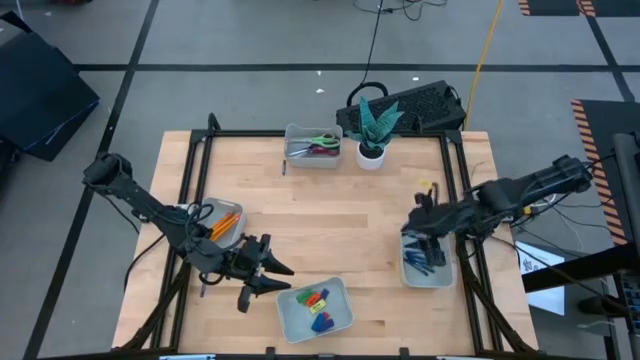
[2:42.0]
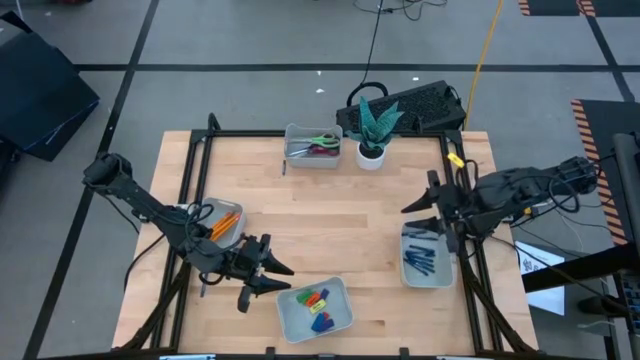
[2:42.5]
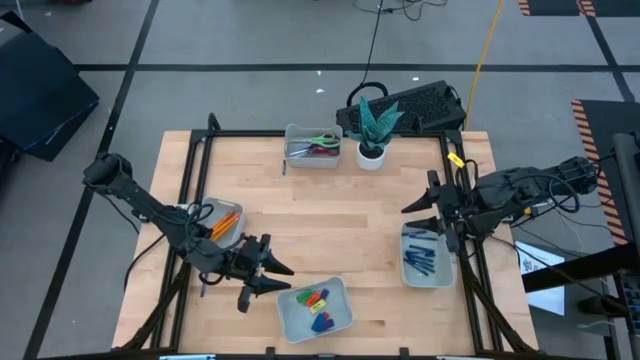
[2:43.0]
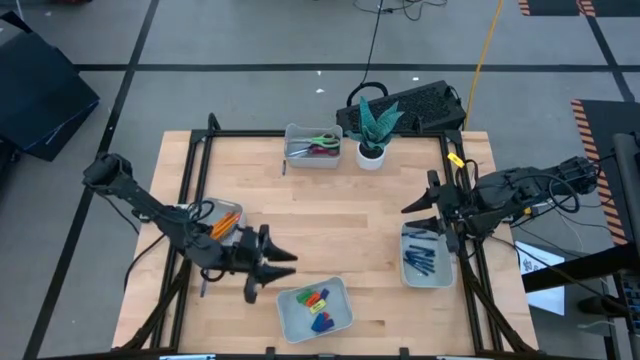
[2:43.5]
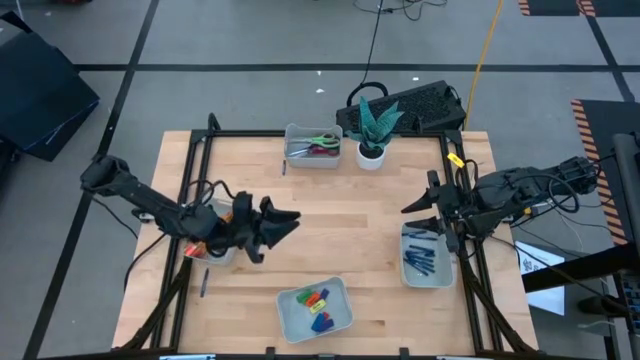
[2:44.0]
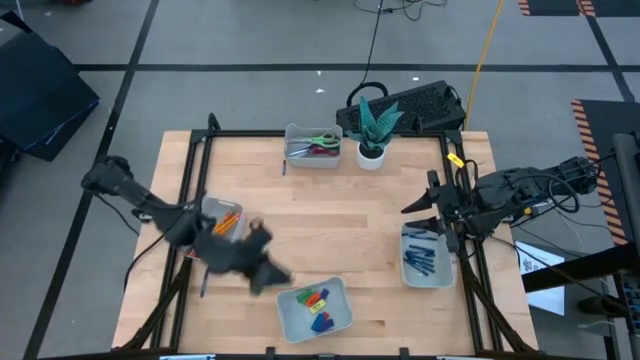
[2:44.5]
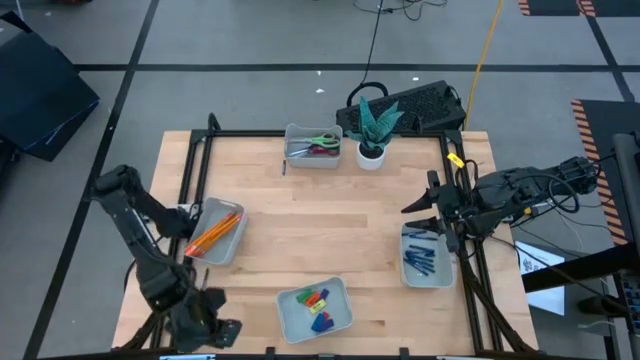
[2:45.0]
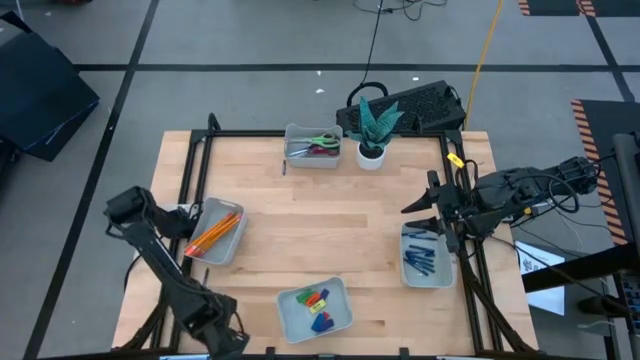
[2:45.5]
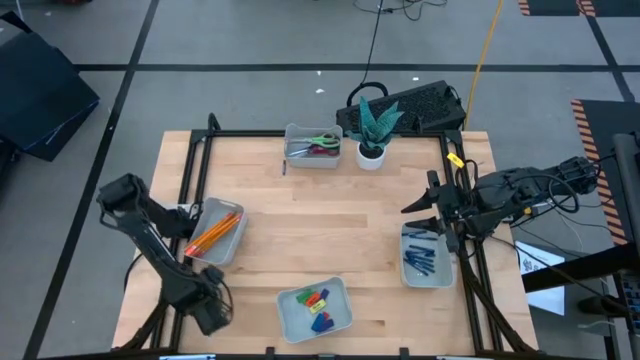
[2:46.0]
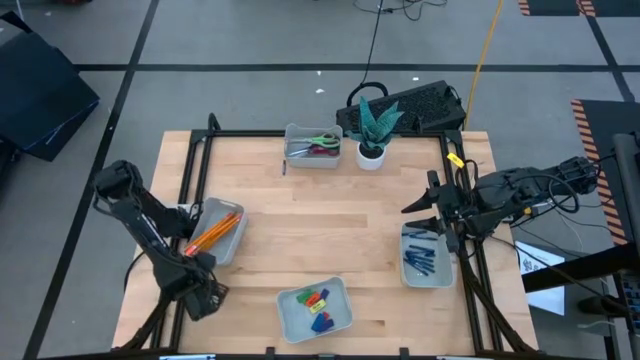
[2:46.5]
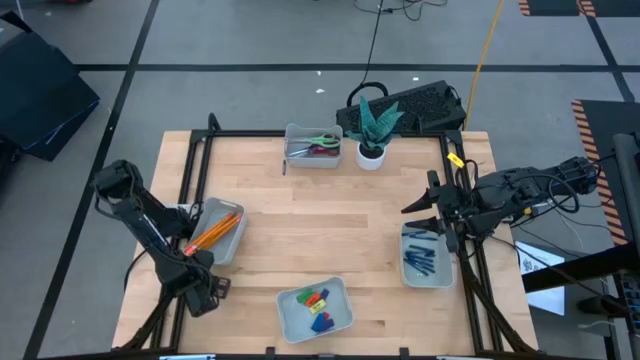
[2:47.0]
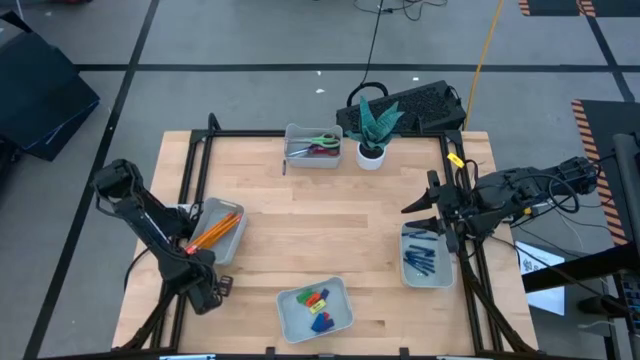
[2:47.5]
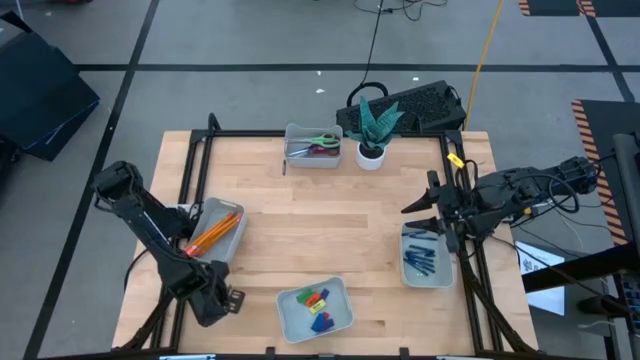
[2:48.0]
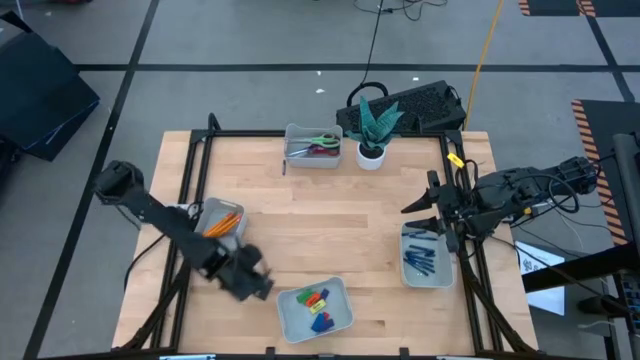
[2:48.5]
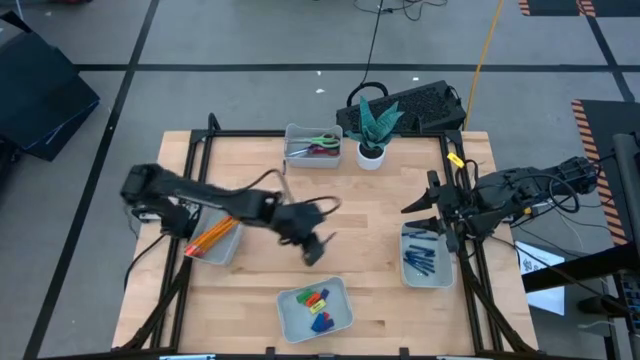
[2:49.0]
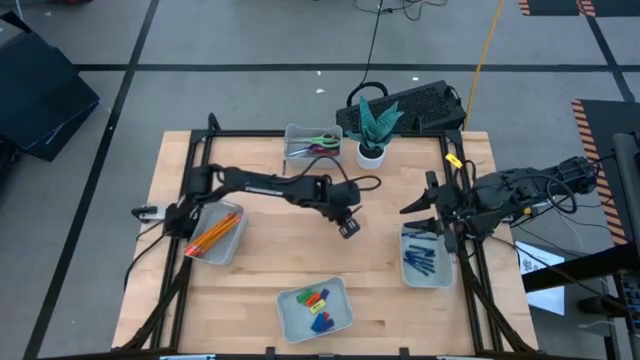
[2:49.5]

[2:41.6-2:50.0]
Task: Sort crayons/erasers/pens/pencils in bins
Move the blue crayon to the center of the table

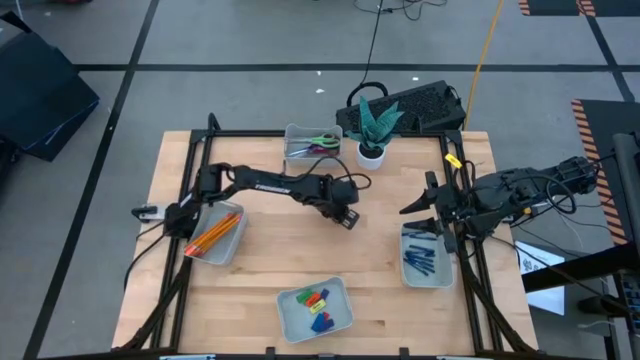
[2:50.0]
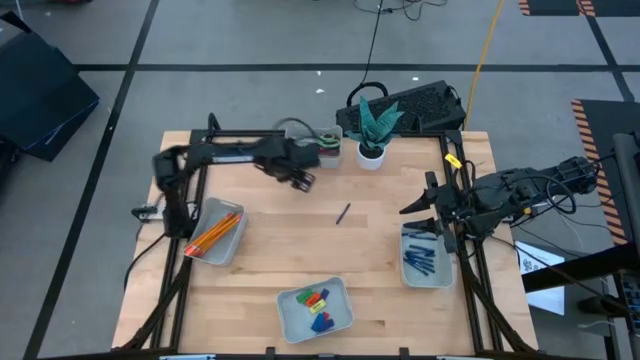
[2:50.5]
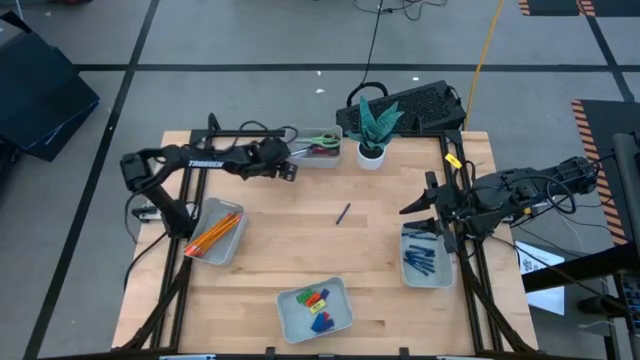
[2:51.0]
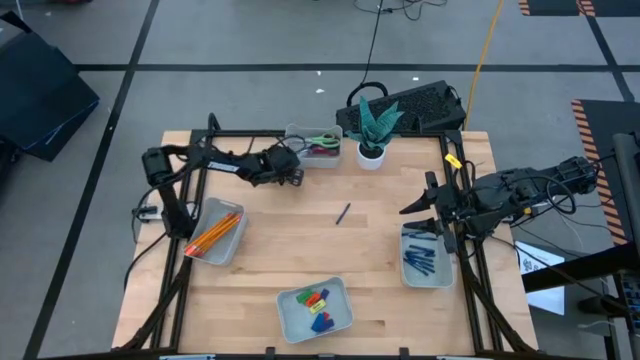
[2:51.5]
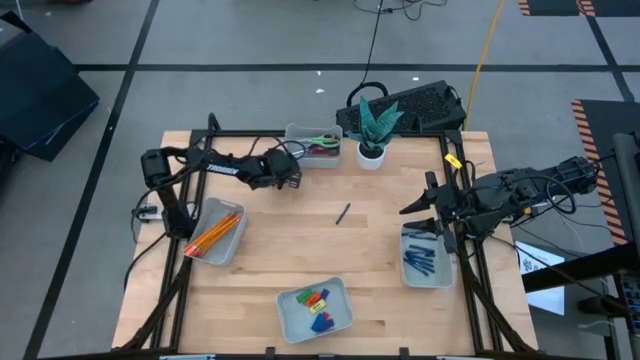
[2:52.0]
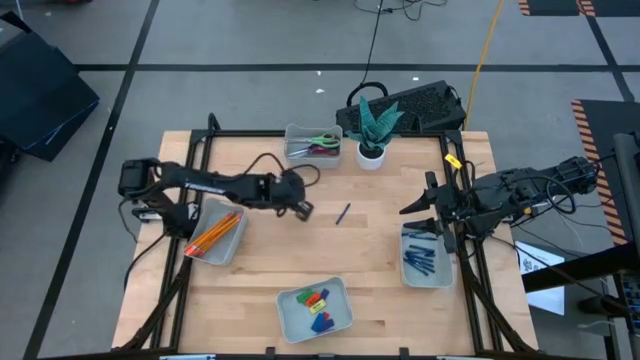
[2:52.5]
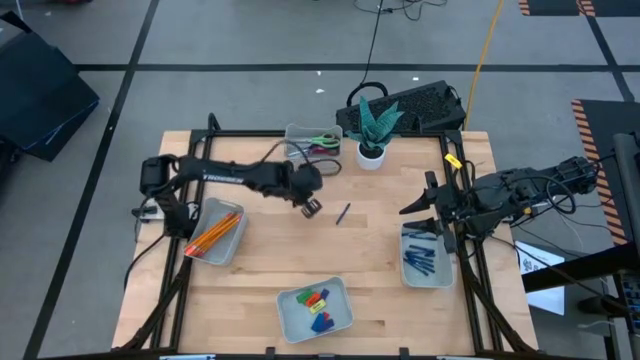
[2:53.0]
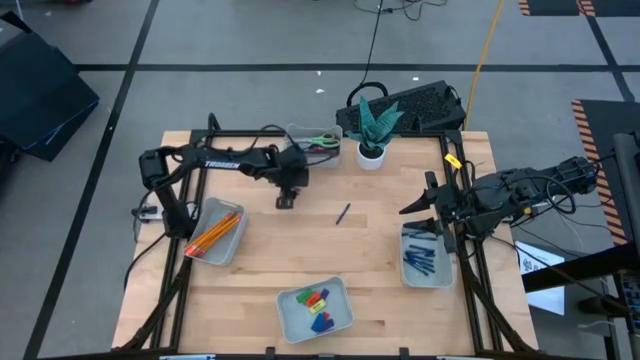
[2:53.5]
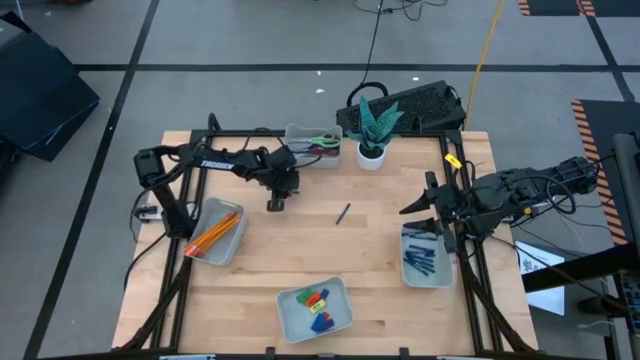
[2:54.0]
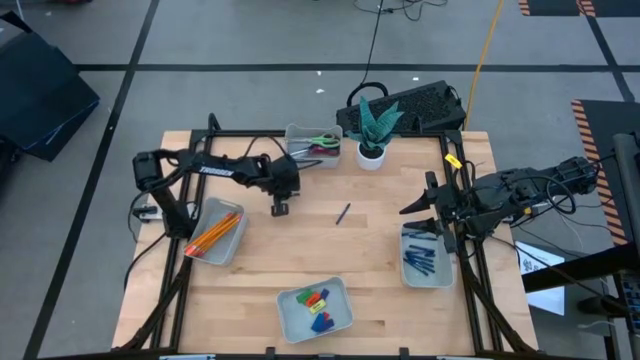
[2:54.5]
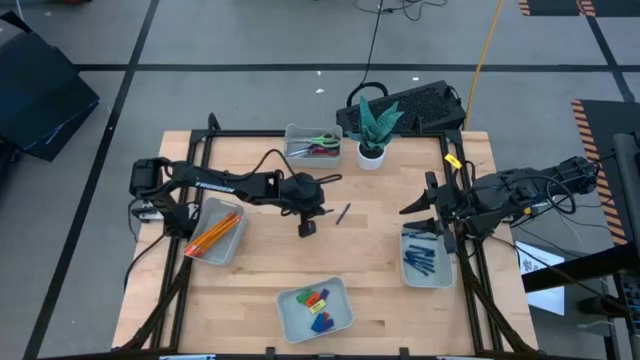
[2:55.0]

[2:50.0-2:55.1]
Put the blue crayon into the middle right gray bin

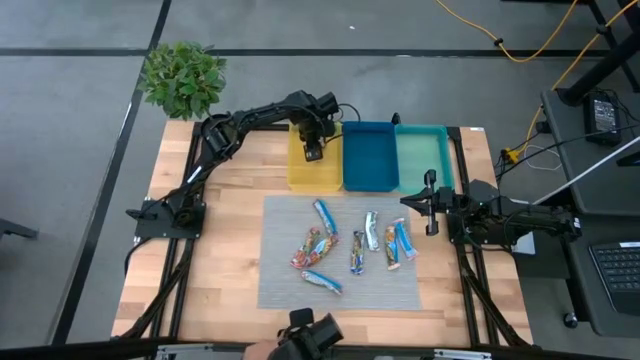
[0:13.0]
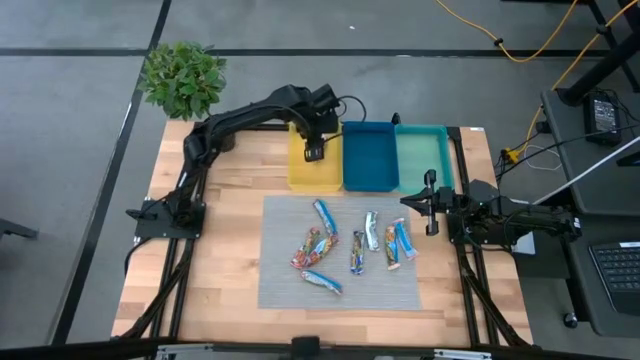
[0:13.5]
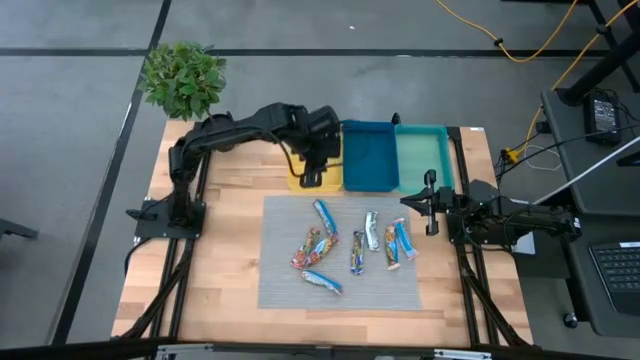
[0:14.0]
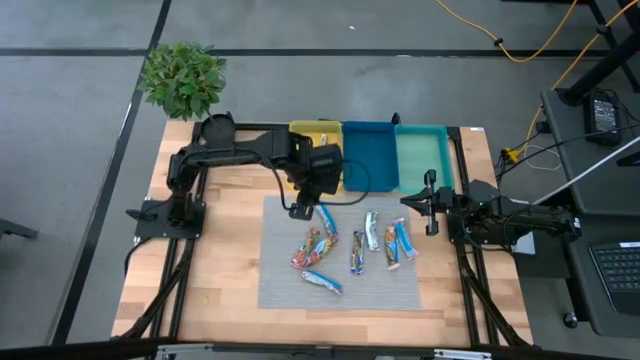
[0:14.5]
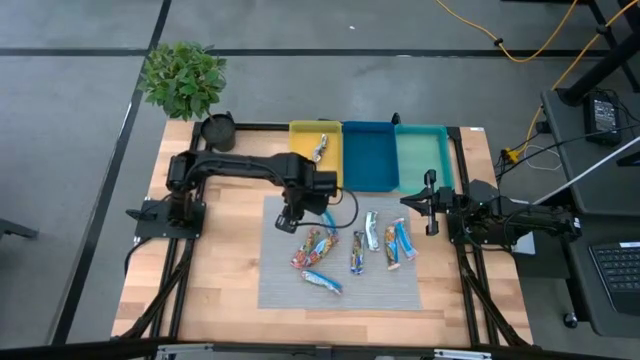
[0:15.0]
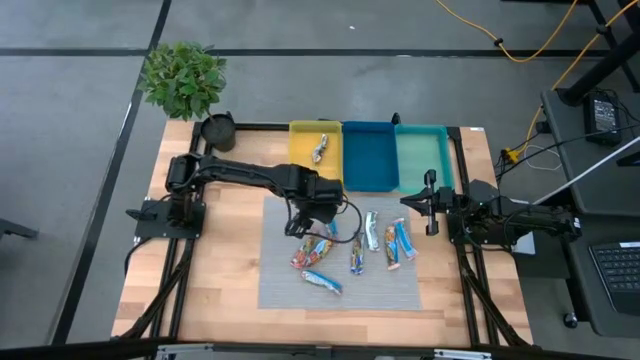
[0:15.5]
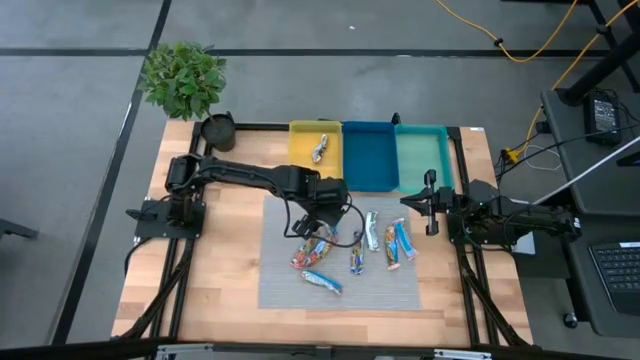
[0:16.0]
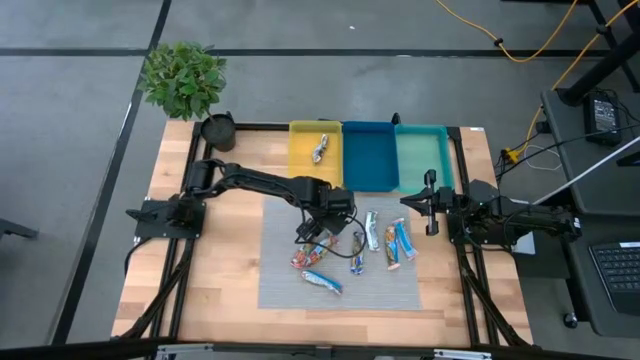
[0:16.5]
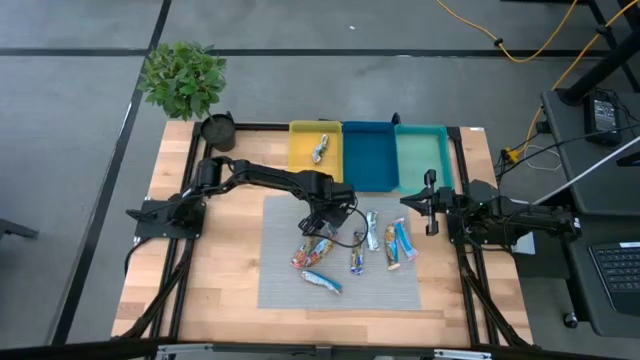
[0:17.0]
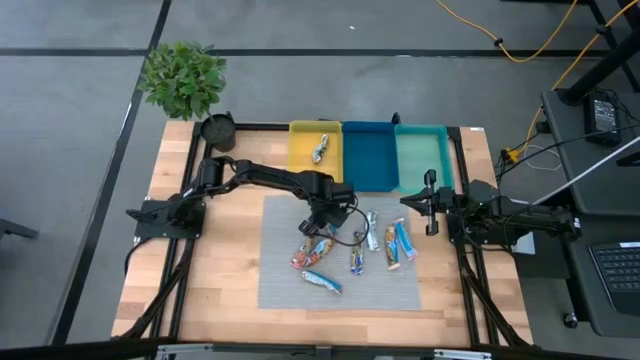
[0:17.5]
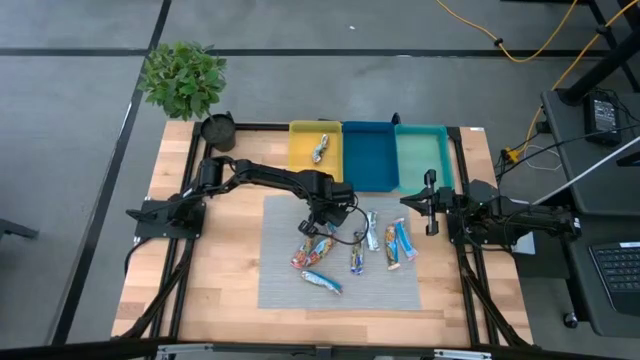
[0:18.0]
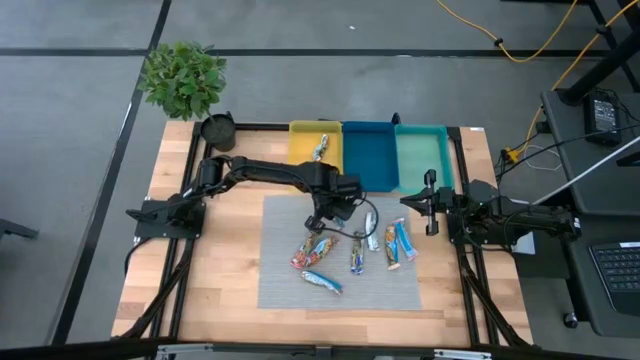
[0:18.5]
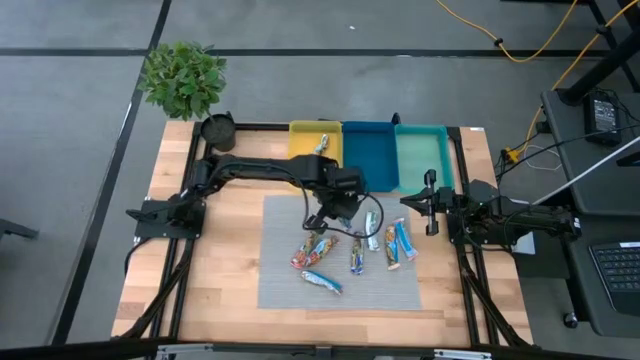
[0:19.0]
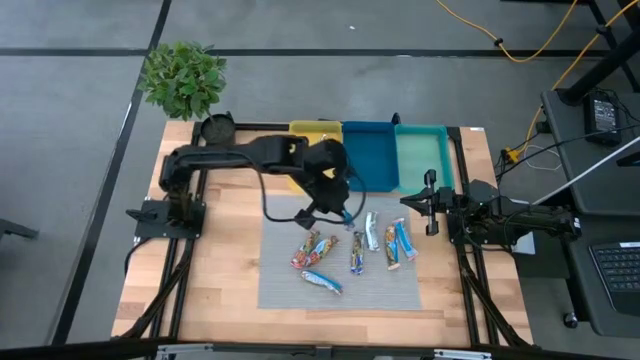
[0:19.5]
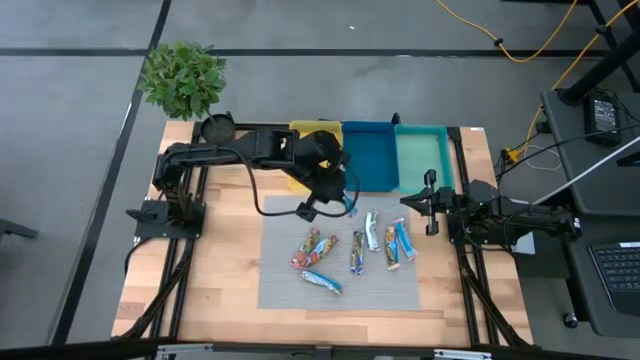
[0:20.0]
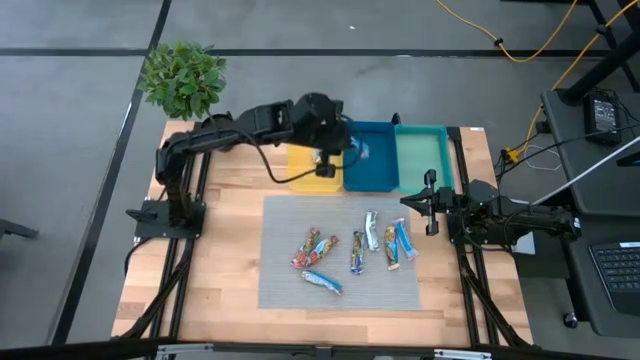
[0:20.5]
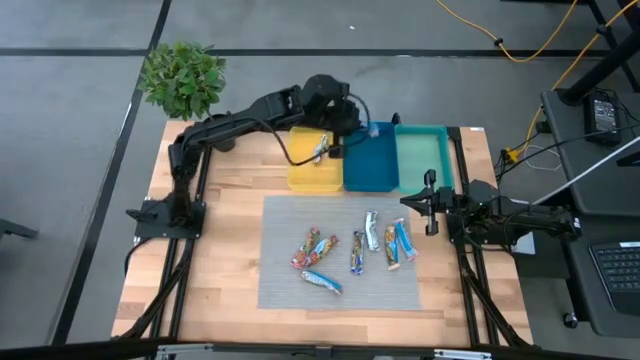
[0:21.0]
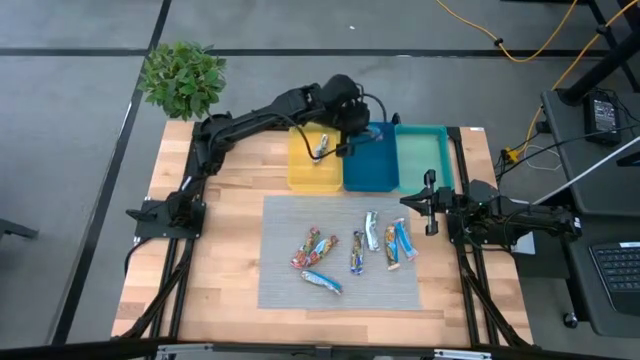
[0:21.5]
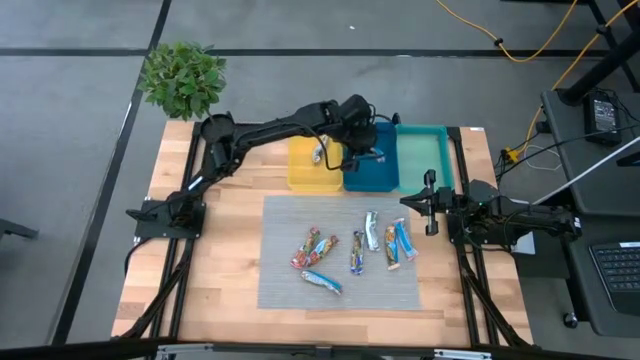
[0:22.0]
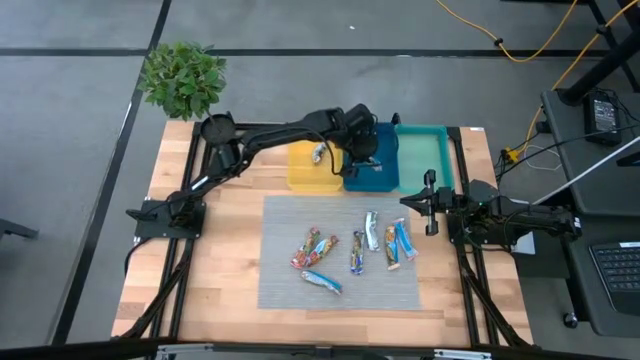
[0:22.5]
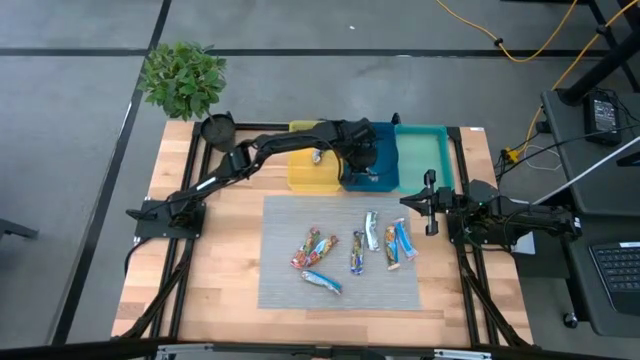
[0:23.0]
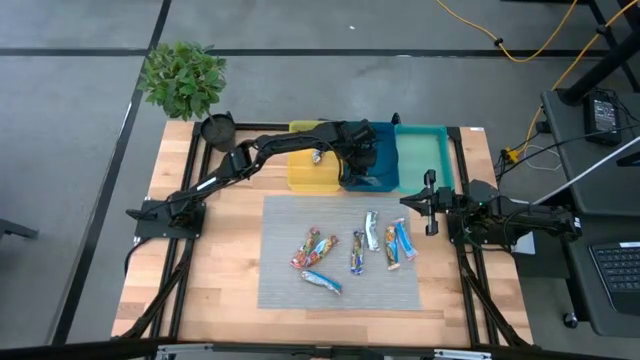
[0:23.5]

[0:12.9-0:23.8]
Task: Pick and place Granola Bars by type
Put the top blue granola bar into the blue bin
